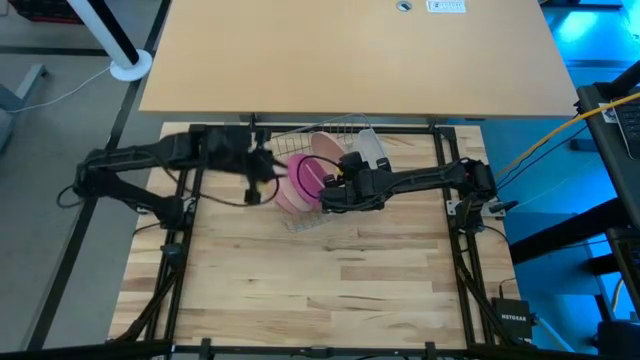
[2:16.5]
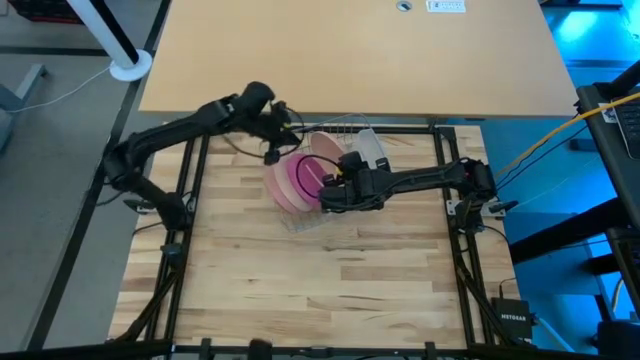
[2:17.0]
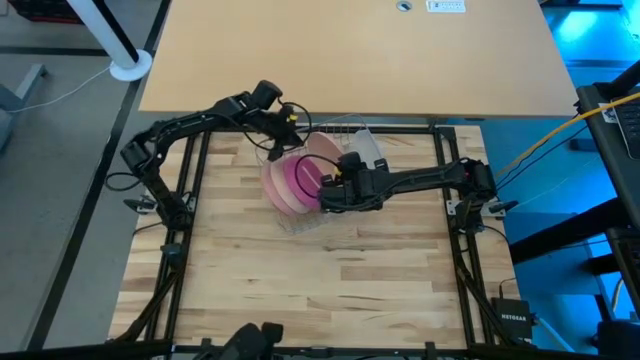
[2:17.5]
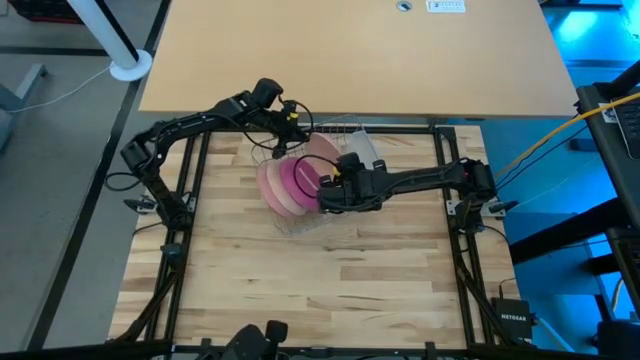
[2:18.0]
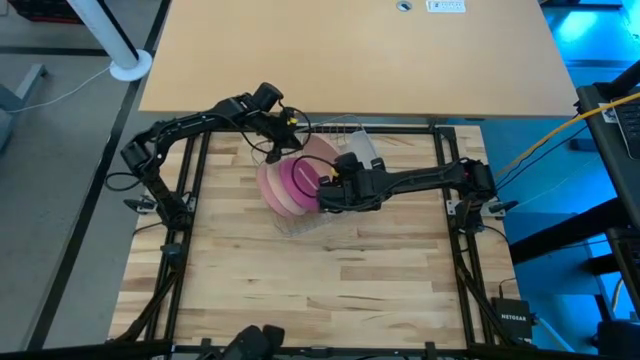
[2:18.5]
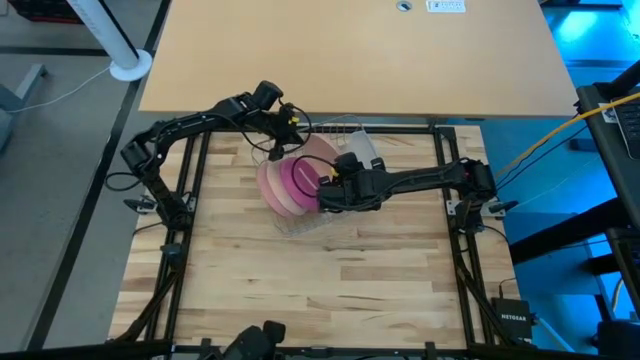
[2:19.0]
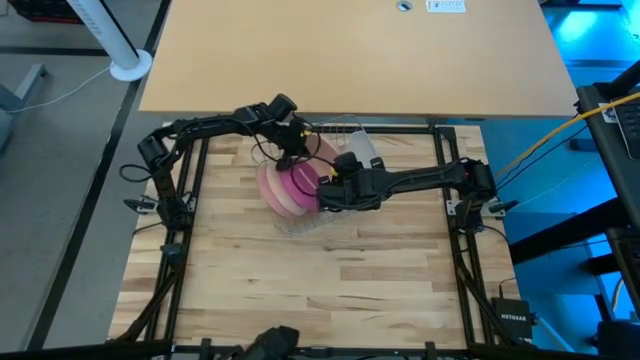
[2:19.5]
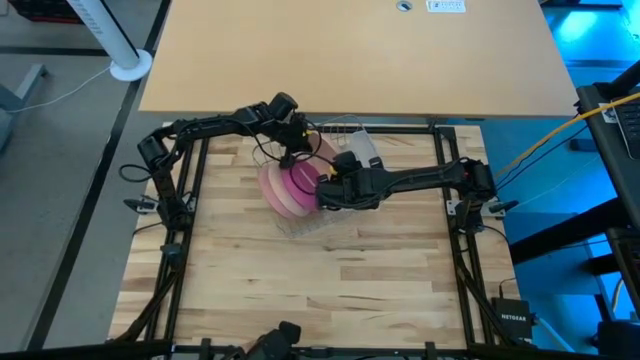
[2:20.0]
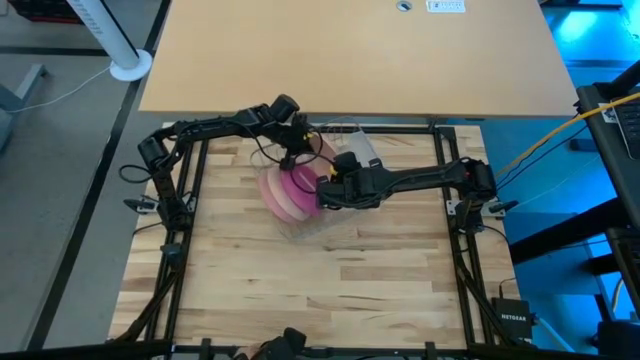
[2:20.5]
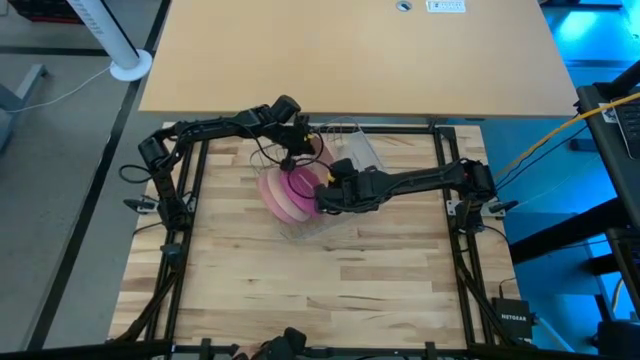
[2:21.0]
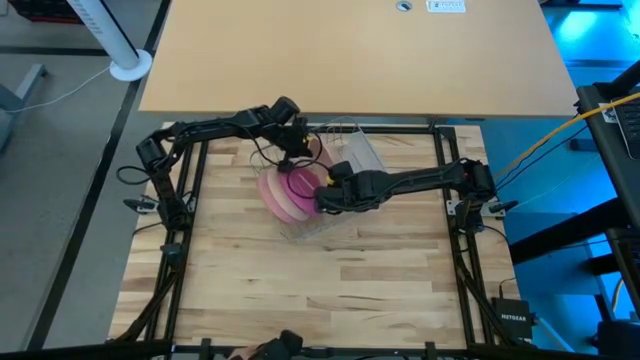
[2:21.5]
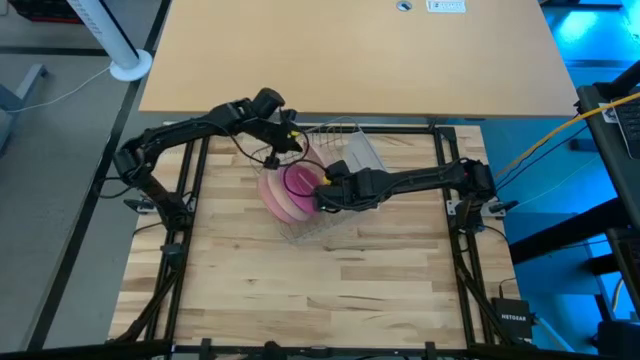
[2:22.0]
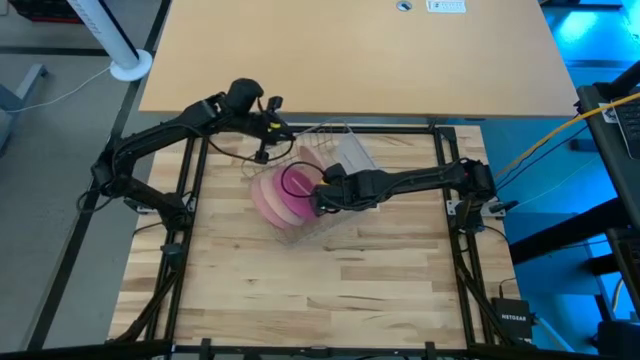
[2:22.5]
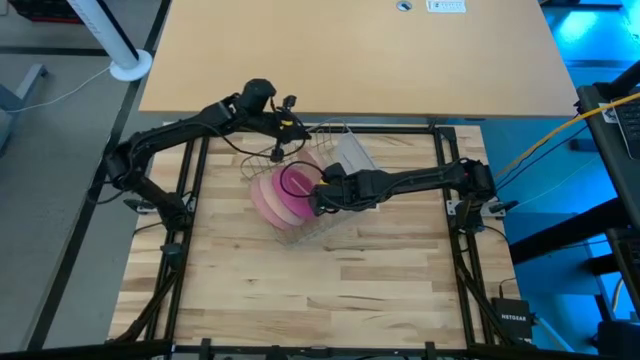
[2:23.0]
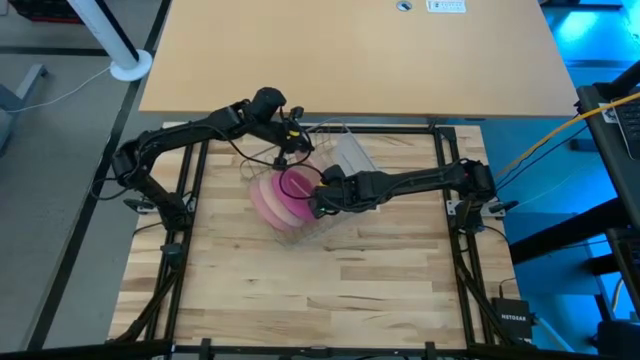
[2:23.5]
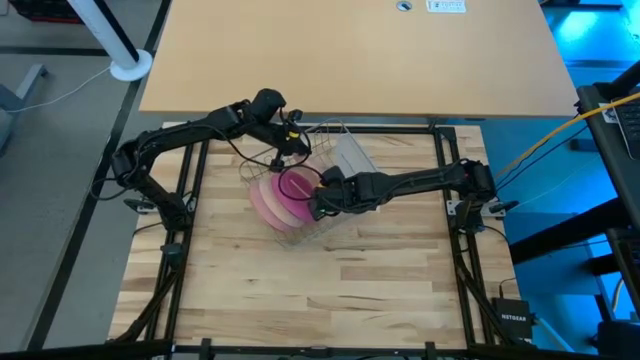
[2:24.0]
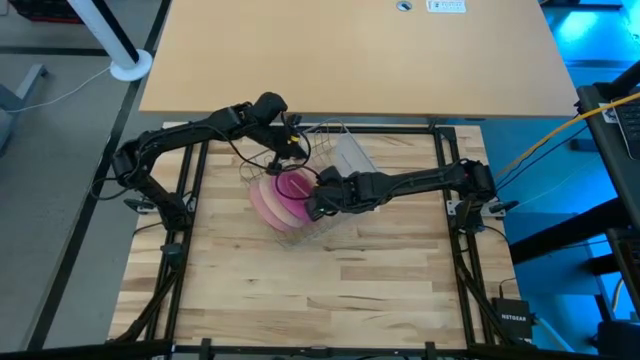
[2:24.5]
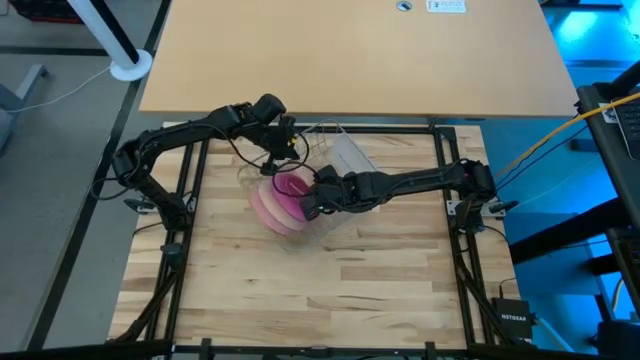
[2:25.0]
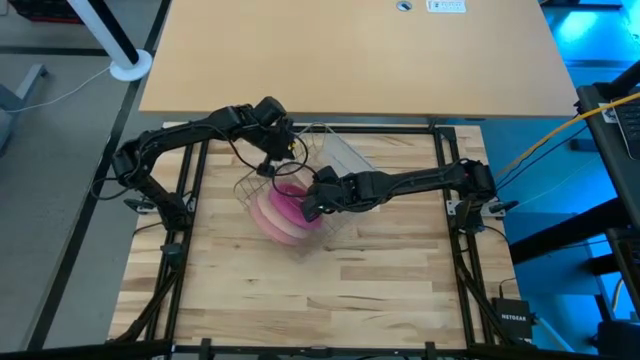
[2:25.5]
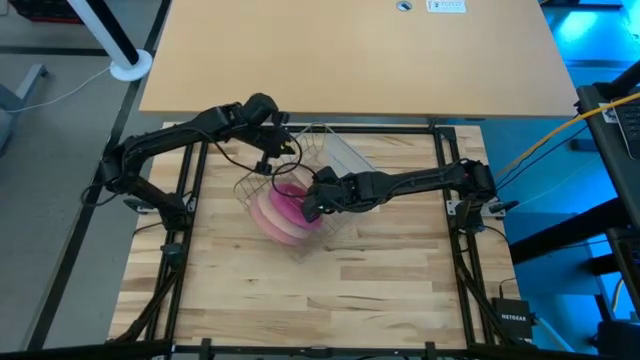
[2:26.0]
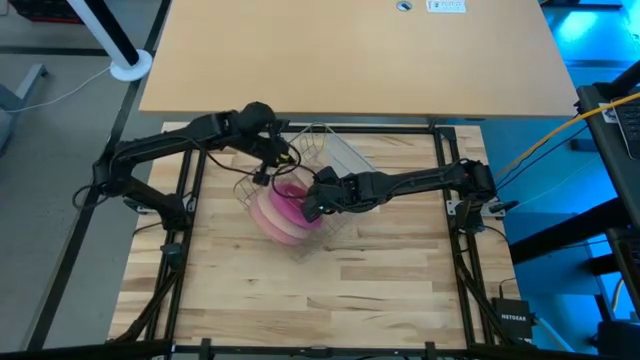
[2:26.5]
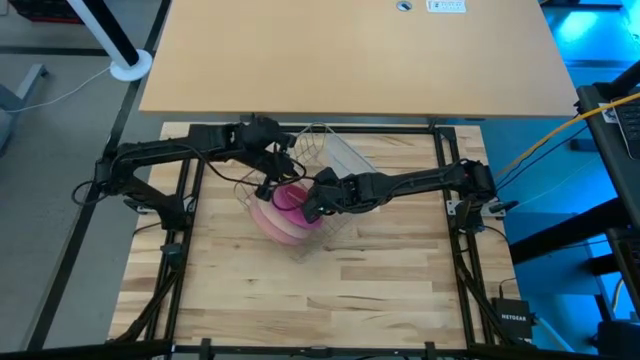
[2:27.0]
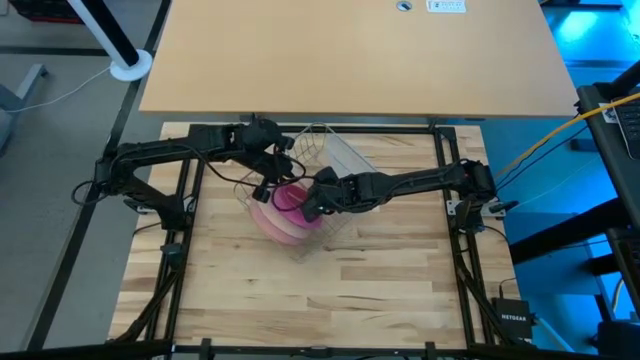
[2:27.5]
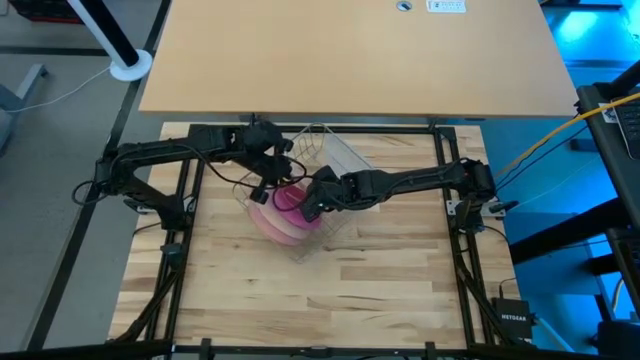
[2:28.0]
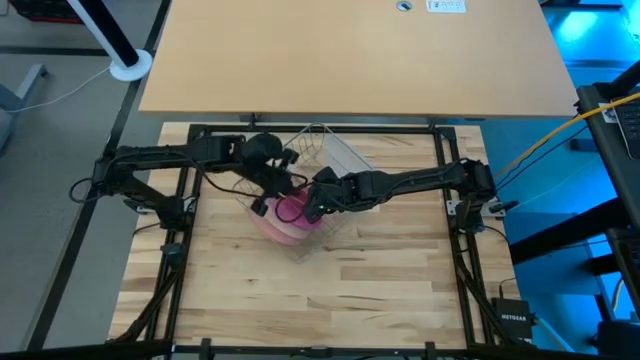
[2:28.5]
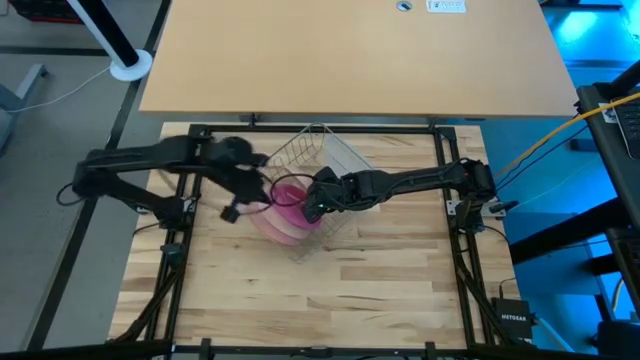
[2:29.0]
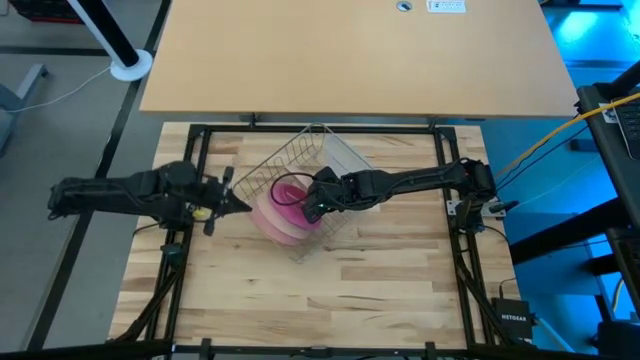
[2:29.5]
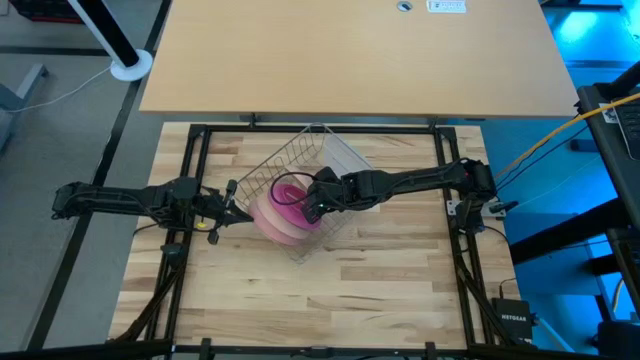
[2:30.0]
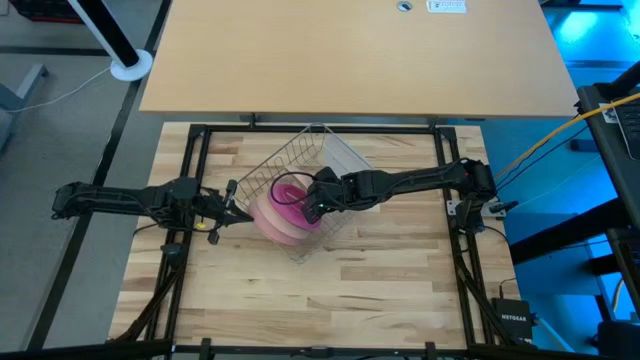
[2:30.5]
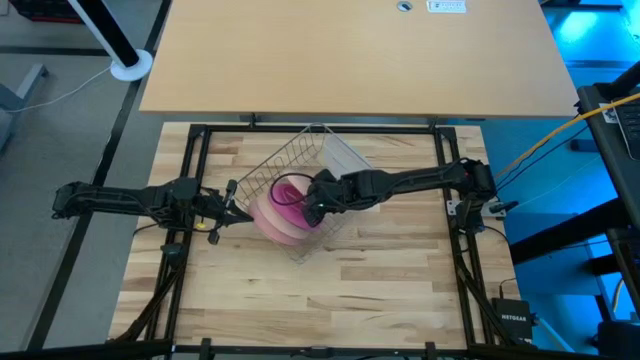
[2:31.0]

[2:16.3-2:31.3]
Task: Sort dishes
Put the light brown plate into the dish rack

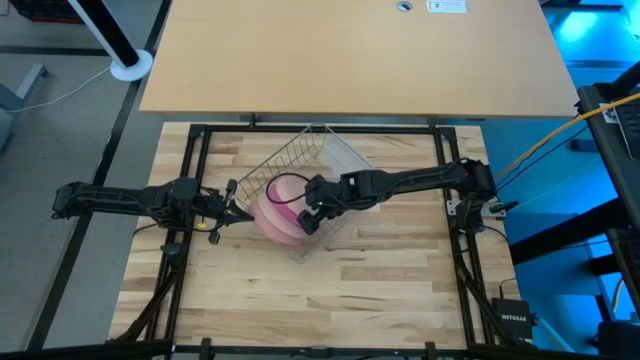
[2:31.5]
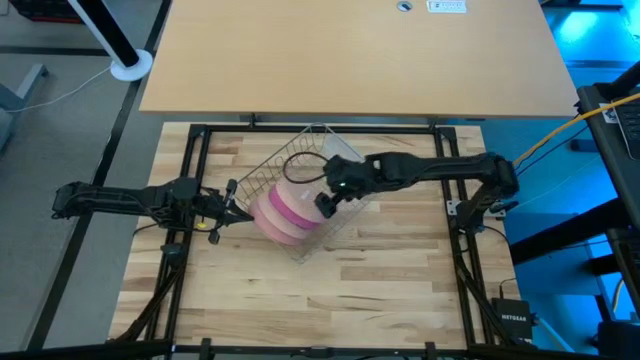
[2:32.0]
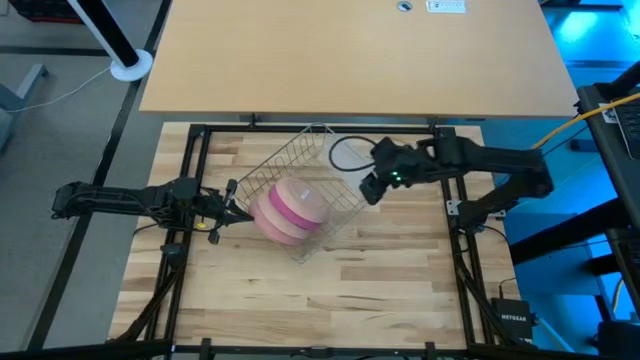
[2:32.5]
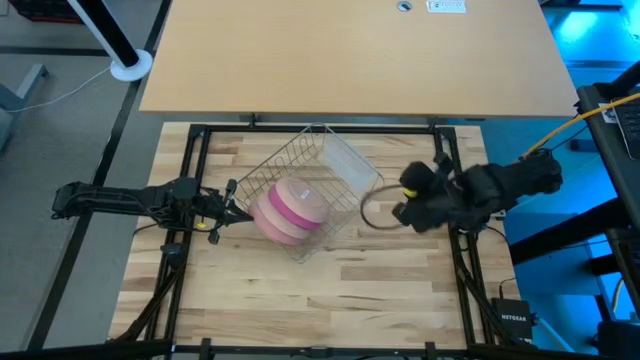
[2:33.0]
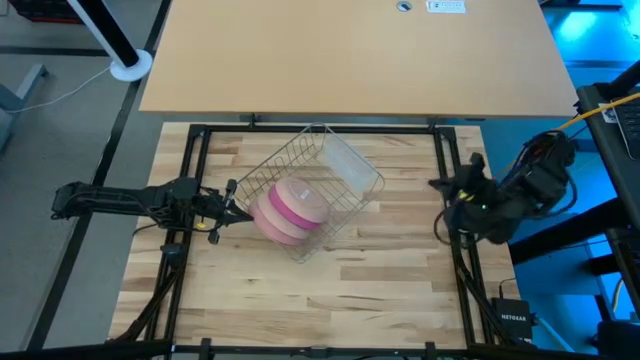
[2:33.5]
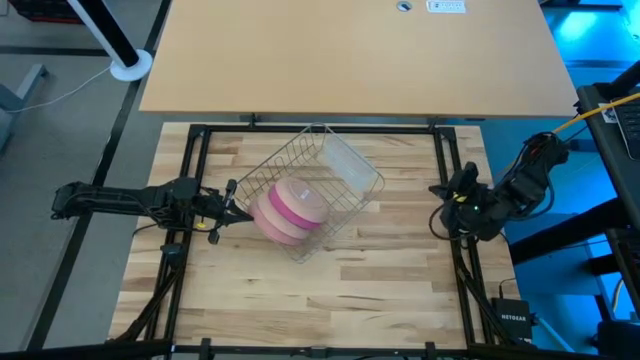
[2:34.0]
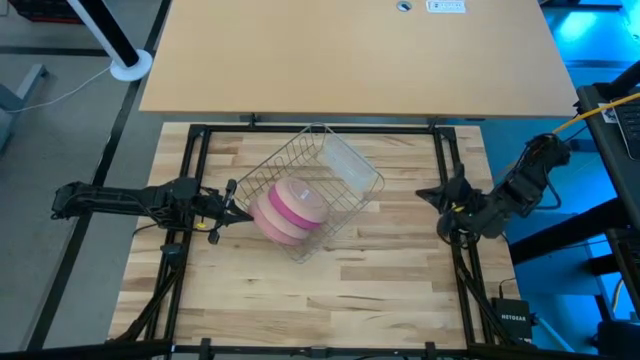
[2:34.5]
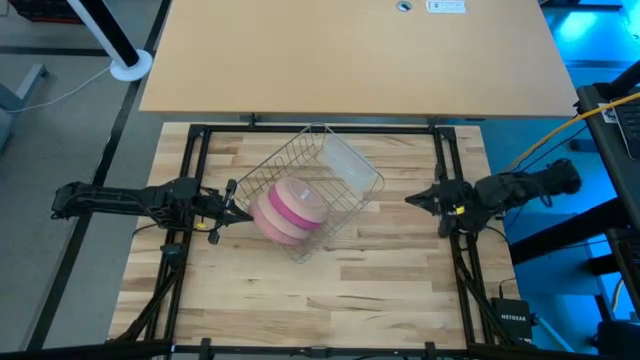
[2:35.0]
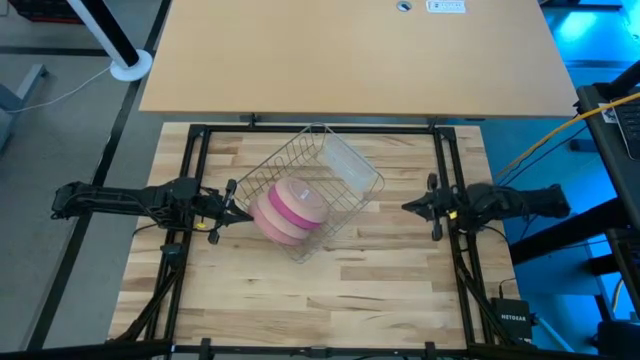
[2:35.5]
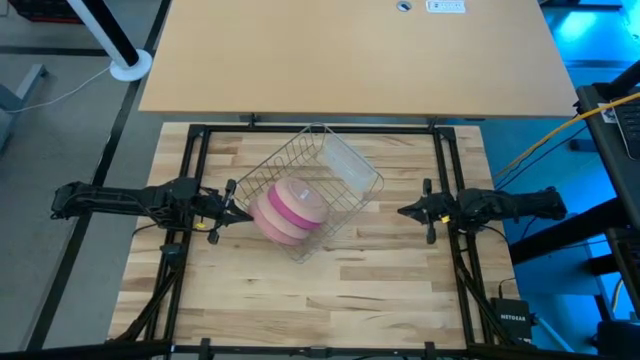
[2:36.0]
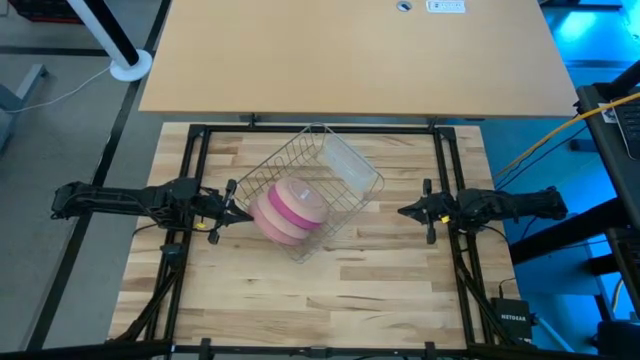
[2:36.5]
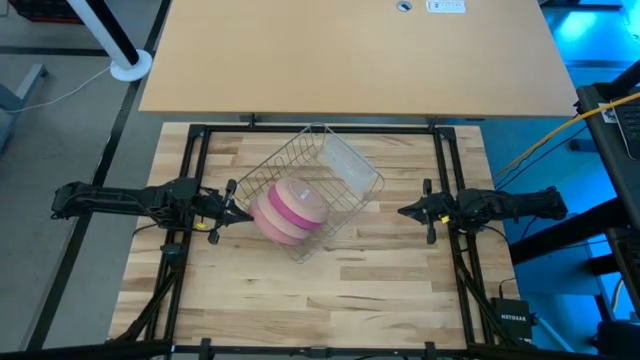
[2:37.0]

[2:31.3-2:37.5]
Return to Home Position
